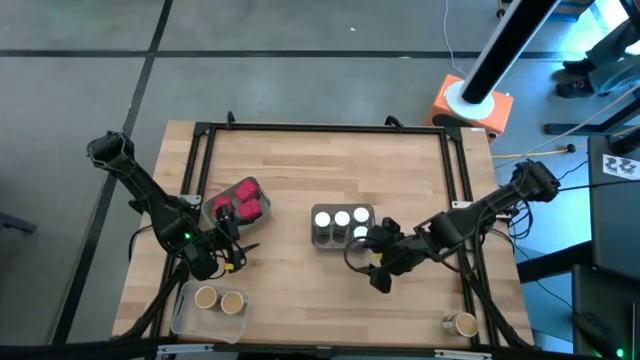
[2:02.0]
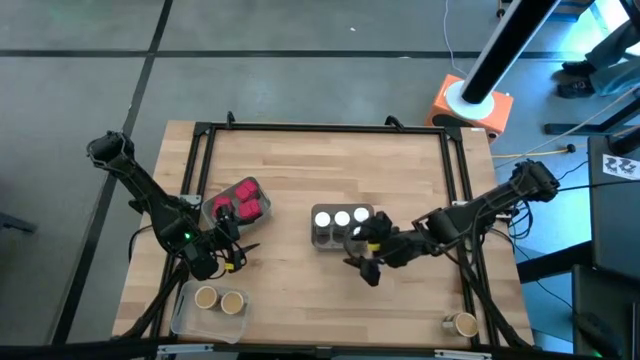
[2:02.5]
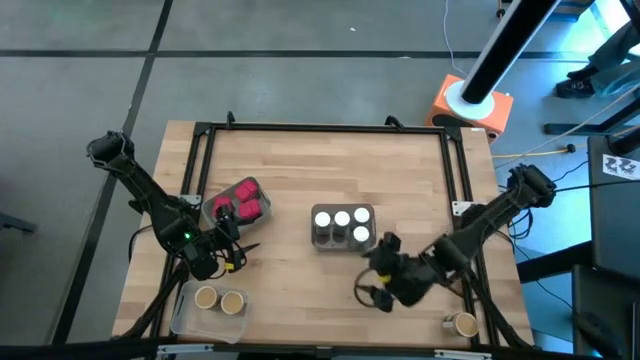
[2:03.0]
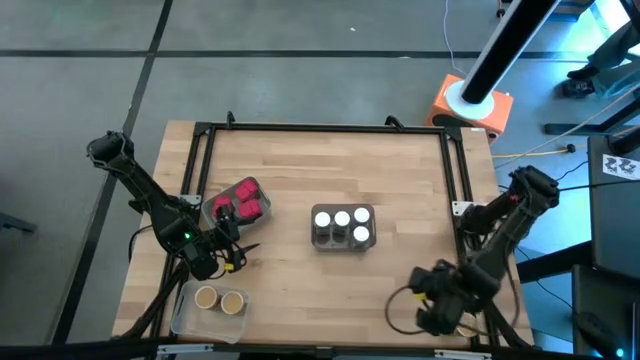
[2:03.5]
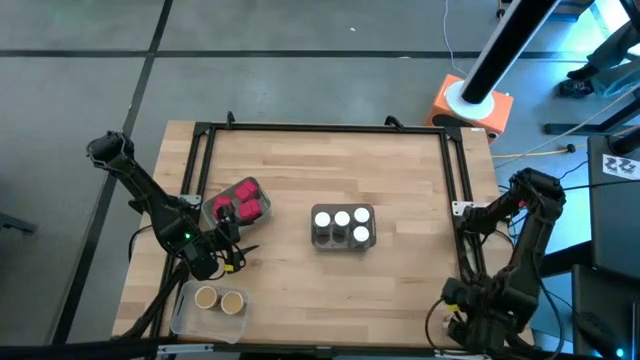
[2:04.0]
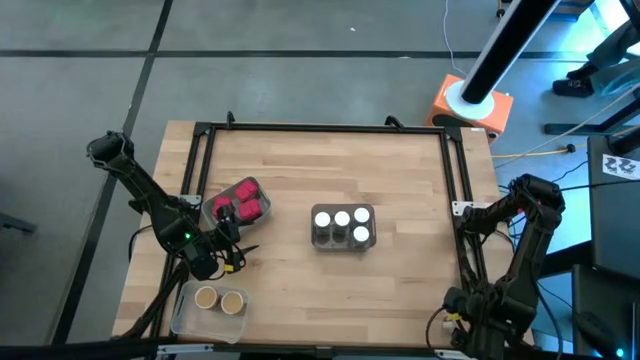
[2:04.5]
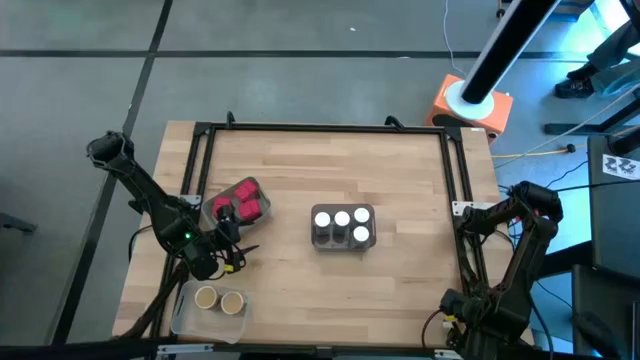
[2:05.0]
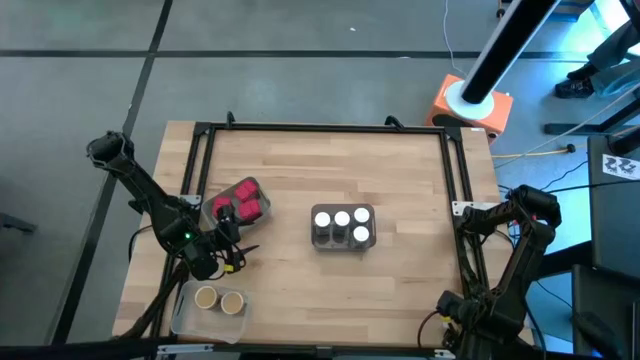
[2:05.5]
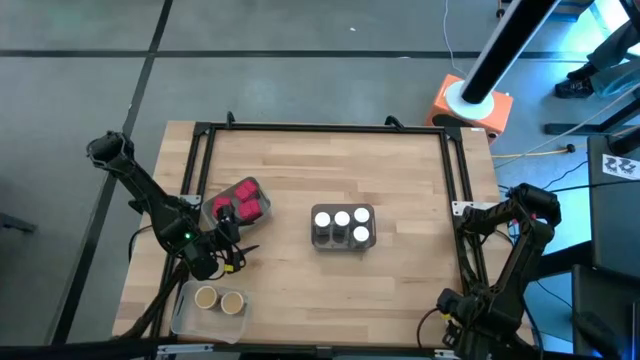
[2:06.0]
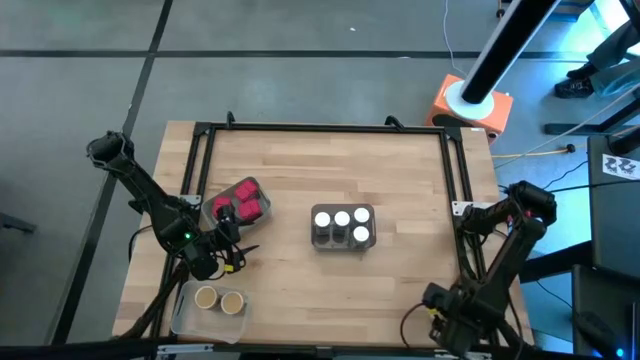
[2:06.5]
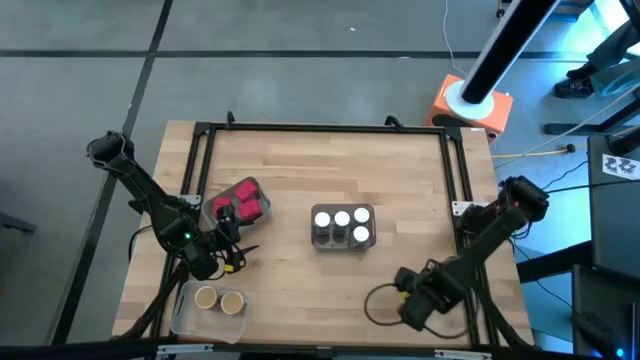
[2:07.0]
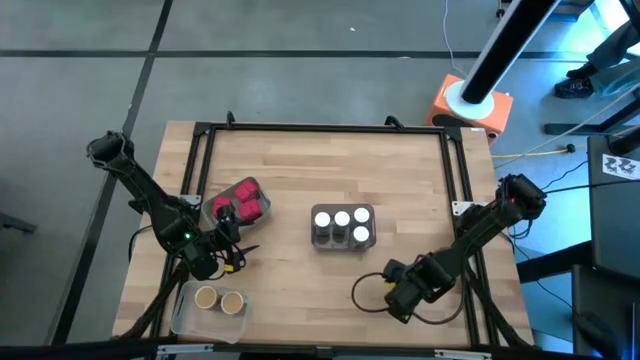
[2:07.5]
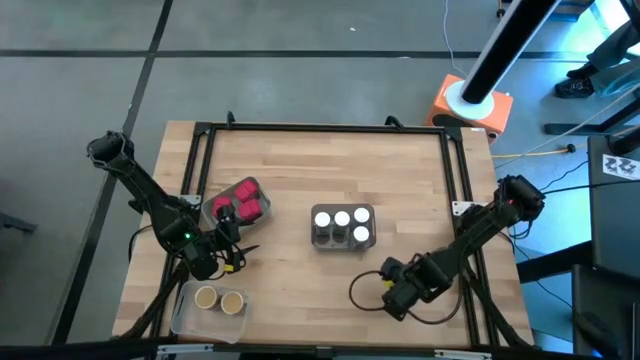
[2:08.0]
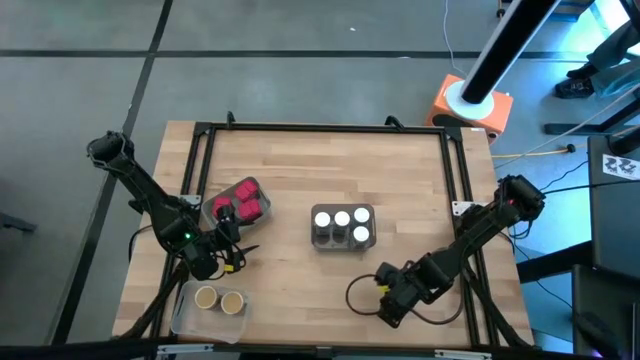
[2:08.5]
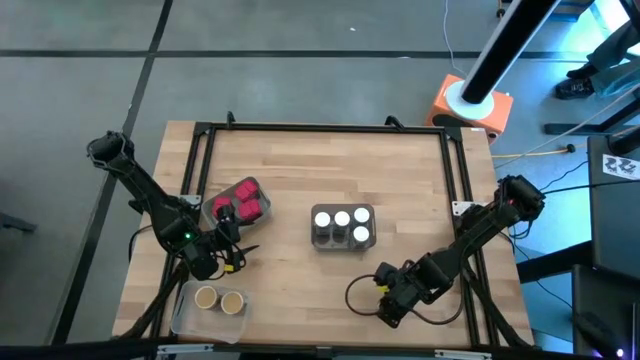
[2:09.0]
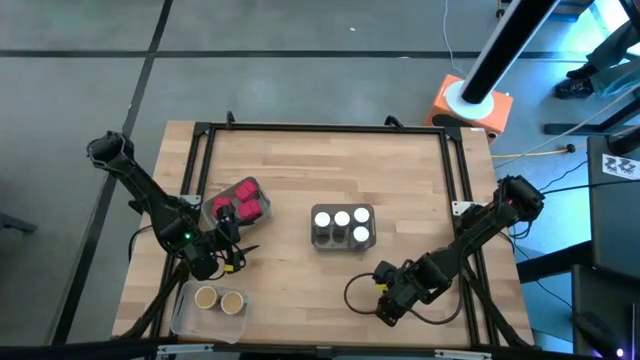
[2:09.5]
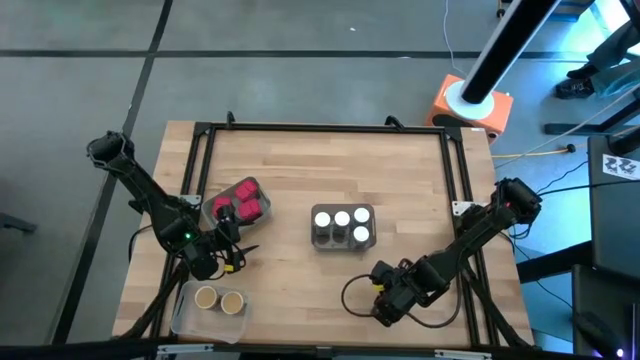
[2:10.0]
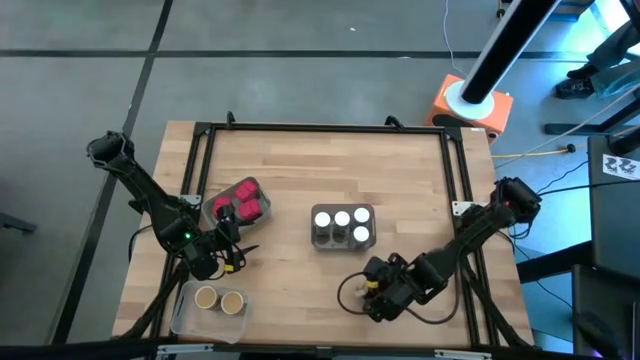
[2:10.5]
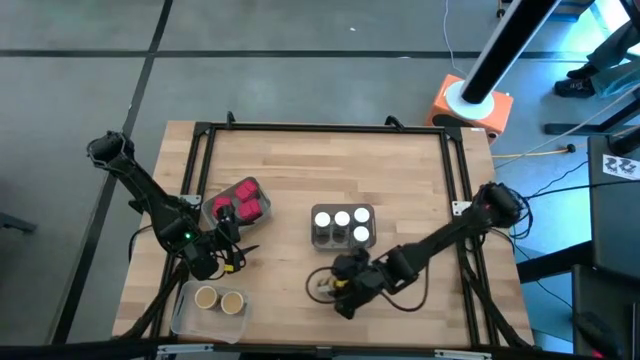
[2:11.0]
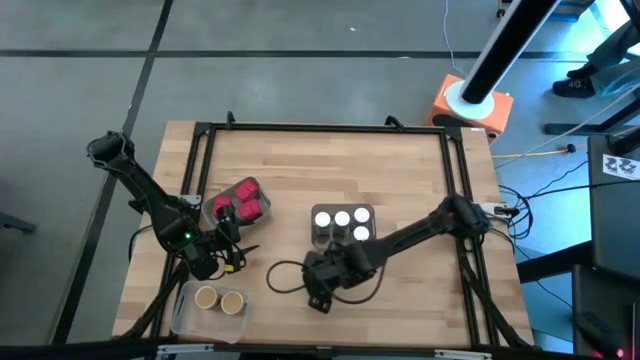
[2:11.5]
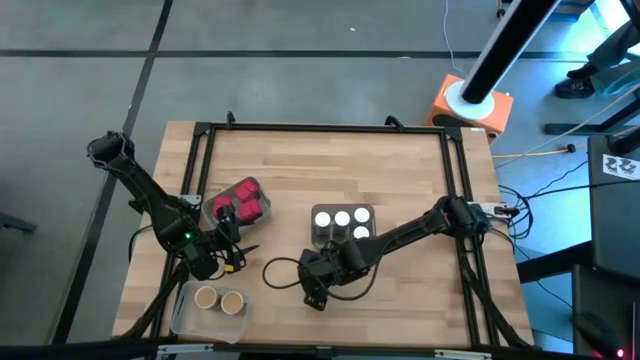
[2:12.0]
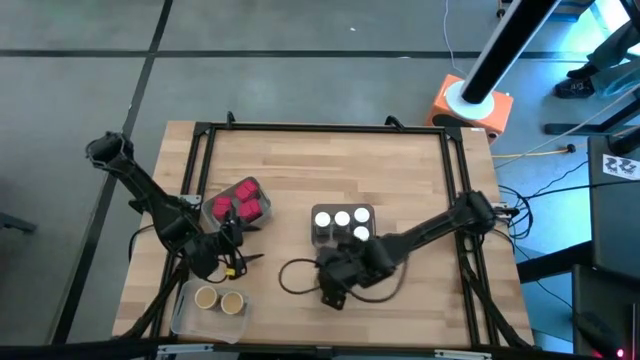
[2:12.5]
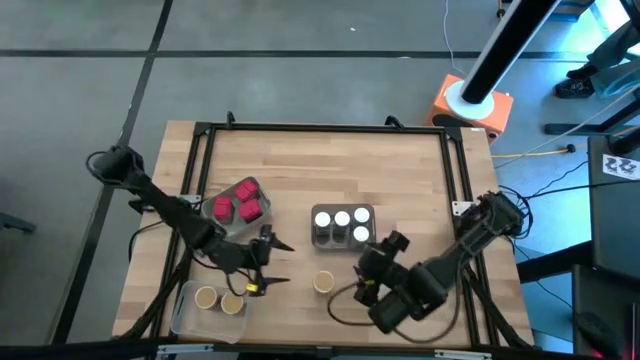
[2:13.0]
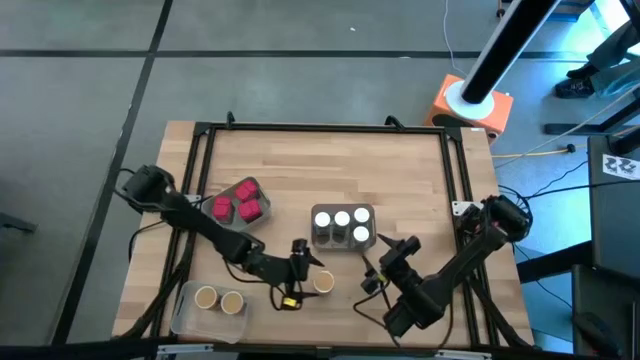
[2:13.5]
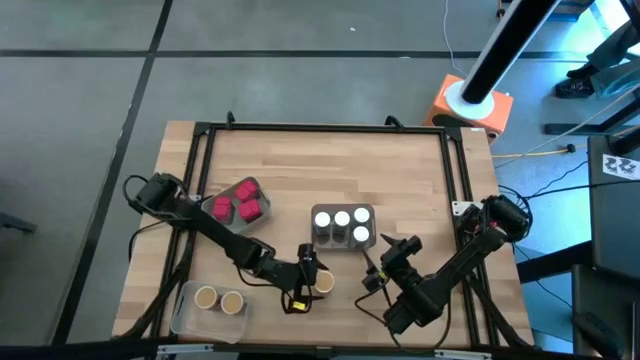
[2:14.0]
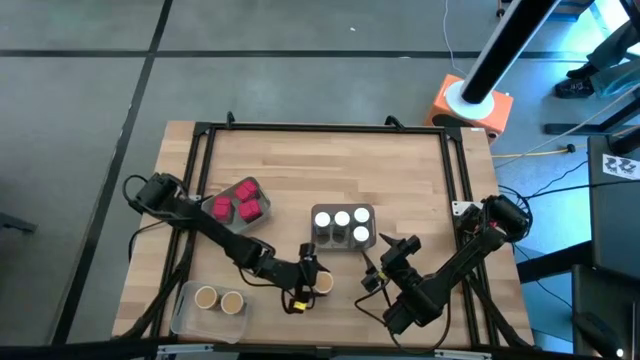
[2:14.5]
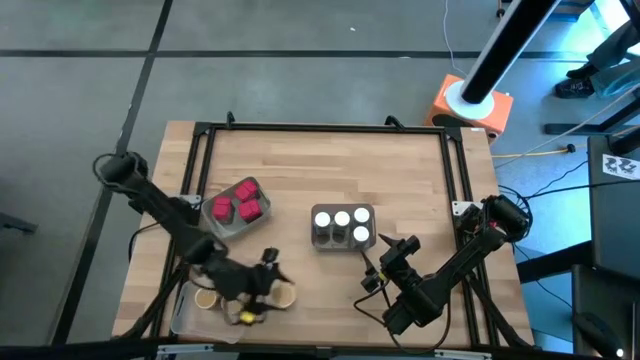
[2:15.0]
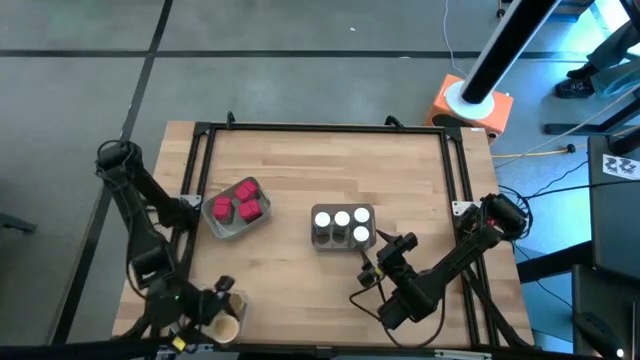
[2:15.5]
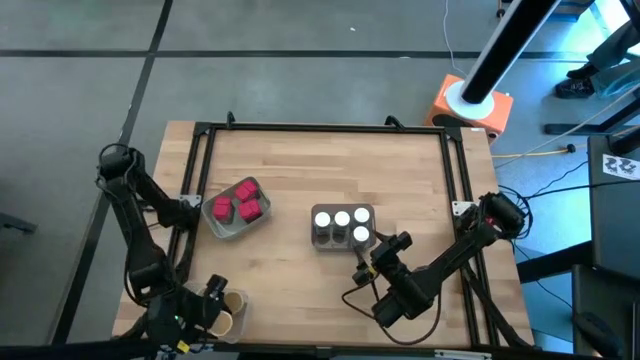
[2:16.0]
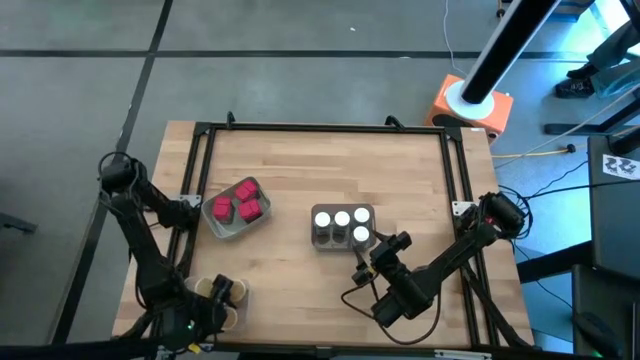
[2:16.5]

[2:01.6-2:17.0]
Task: Sort spices by type
Put the gold seasoning bottle into the transparent bin

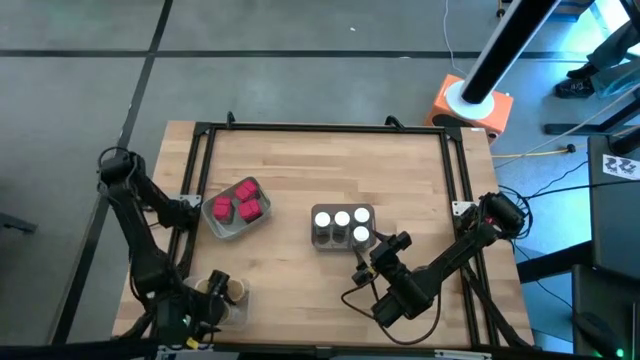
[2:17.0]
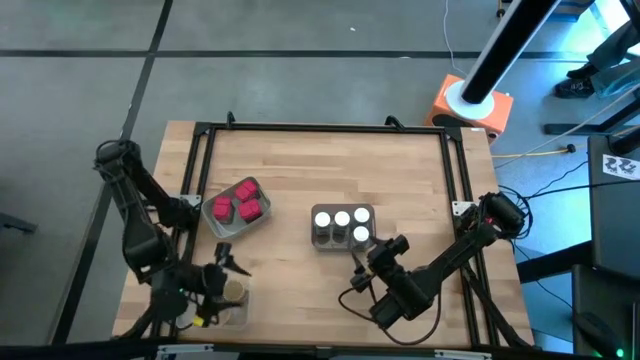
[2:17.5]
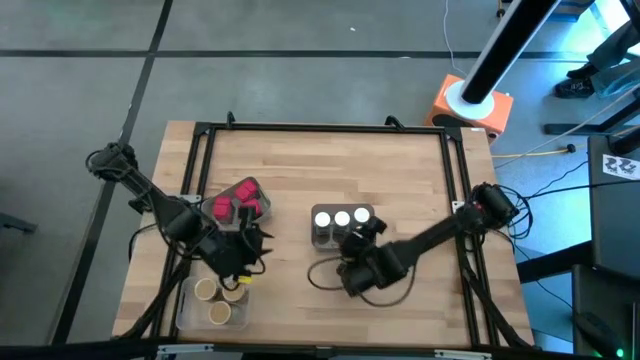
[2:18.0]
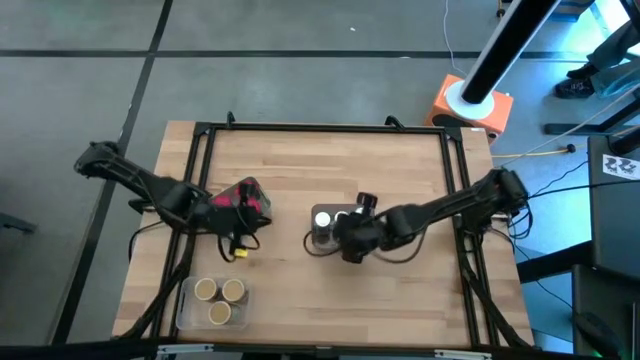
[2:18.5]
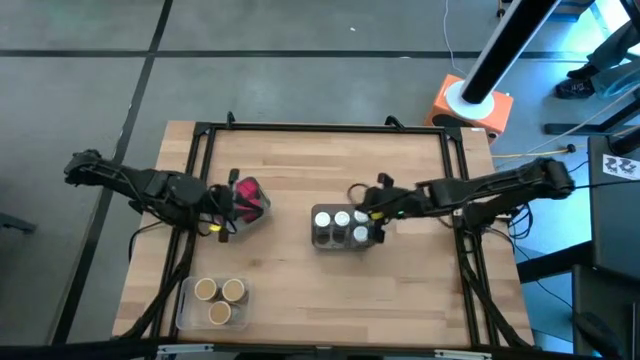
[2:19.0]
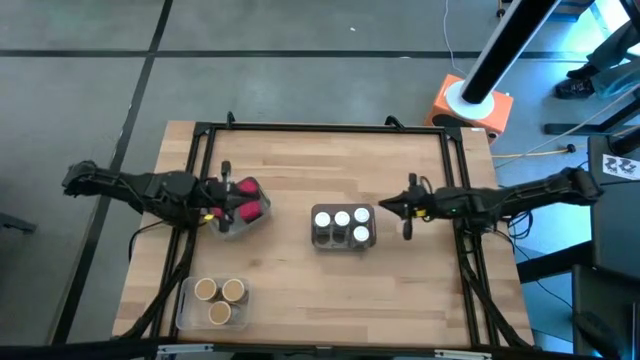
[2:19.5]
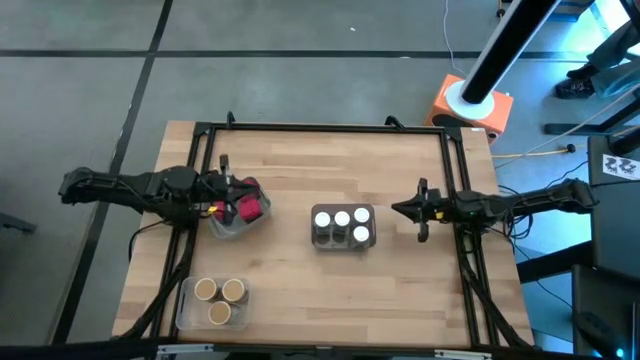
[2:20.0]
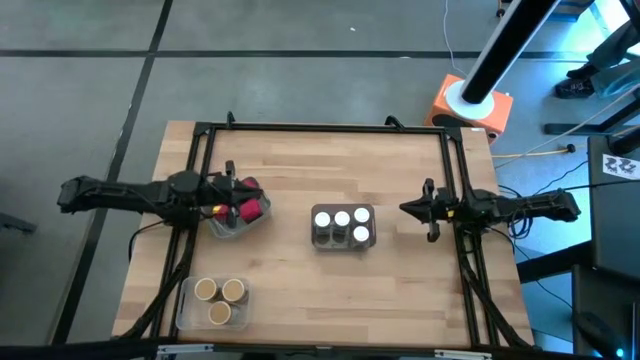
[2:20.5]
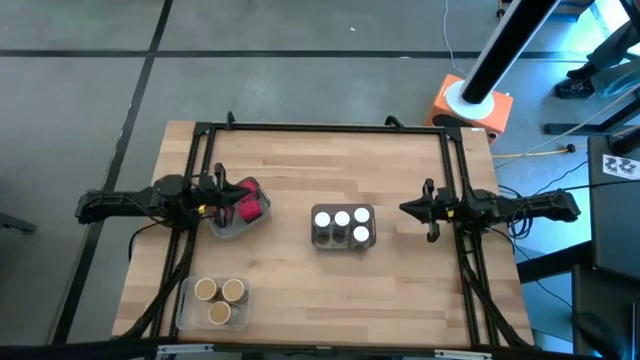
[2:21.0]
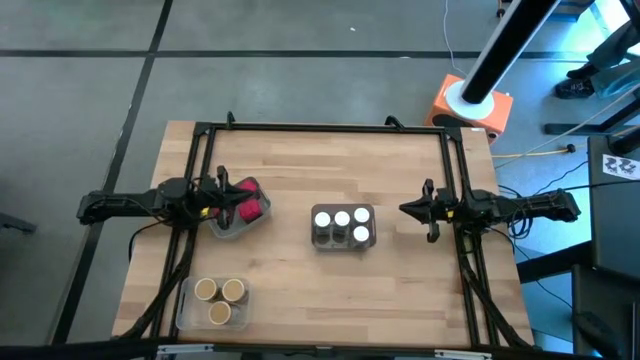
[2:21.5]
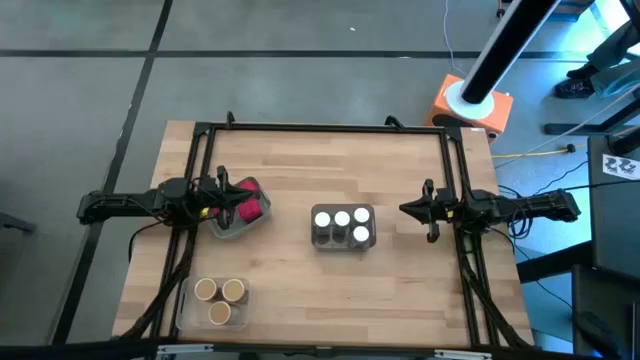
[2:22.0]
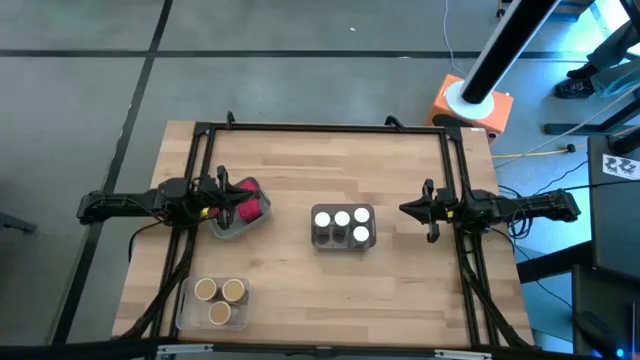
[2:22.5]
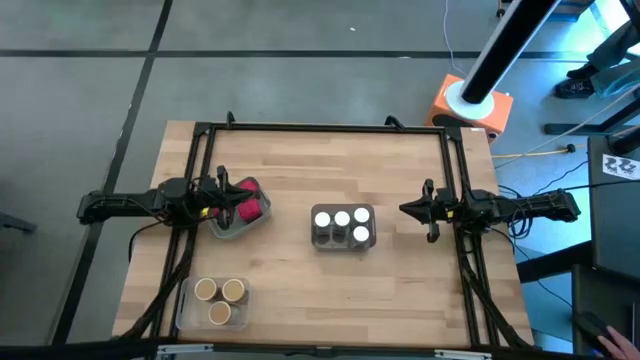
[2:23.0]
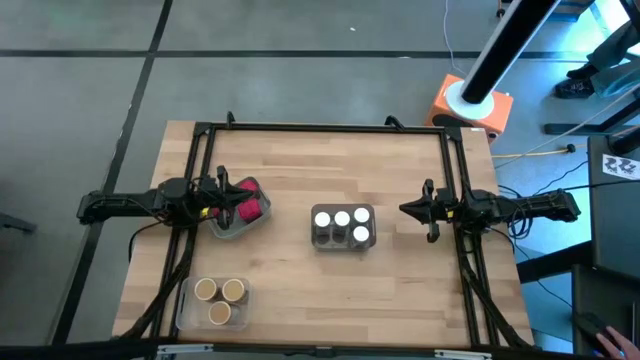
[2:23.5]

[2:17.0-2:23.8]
Return to Home Position

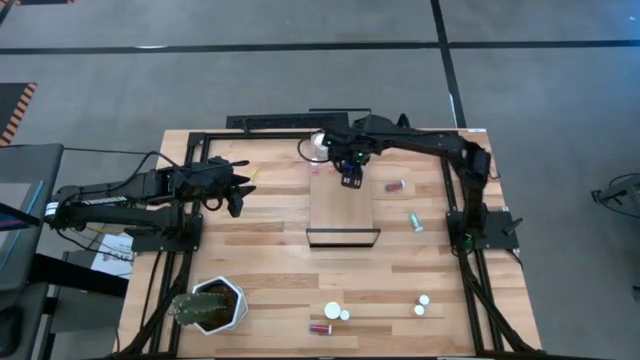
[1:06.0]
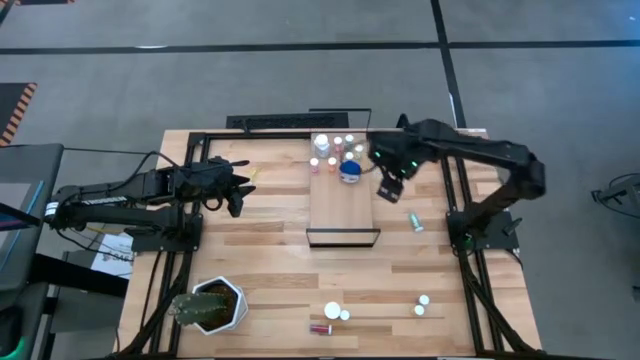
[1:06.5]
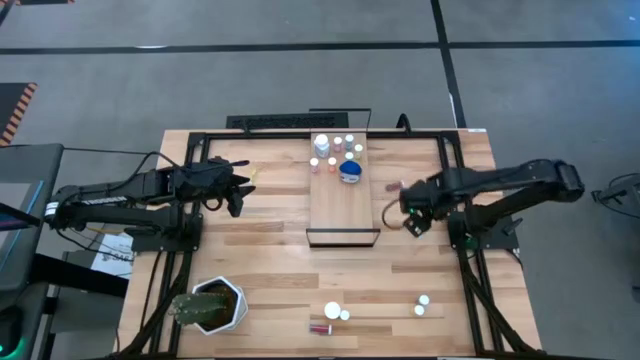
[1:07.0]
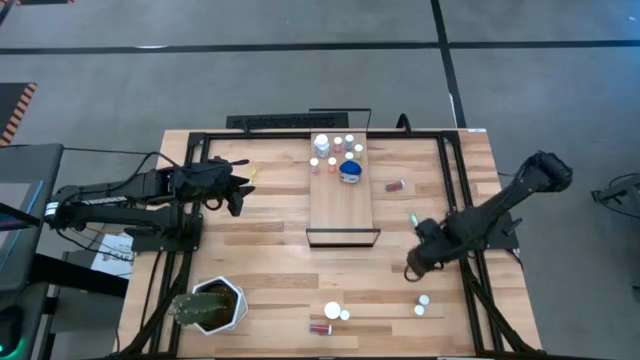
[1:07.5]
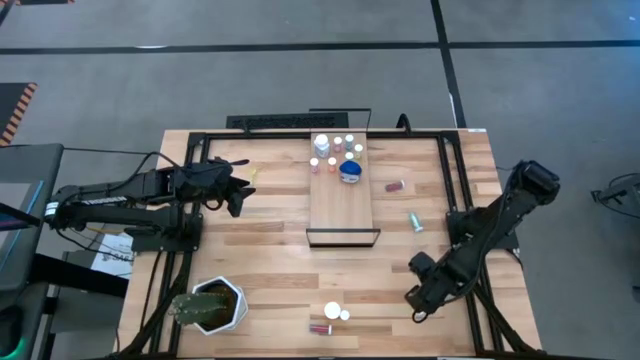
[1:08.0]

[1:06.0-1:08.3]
Task: Pick and place medicine bottles onto shelf by color
Put the green pill bottle on the shelf
